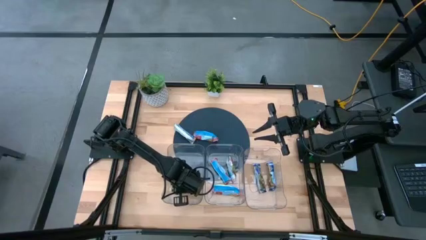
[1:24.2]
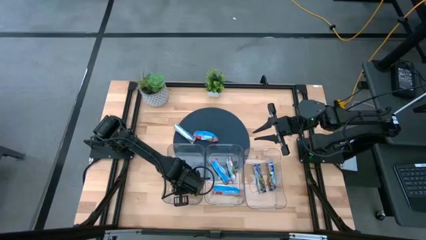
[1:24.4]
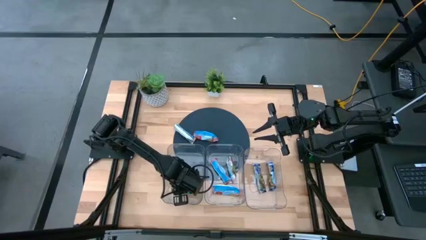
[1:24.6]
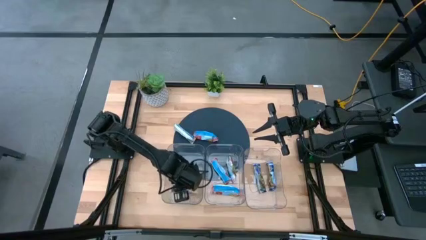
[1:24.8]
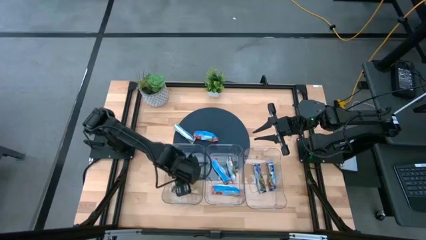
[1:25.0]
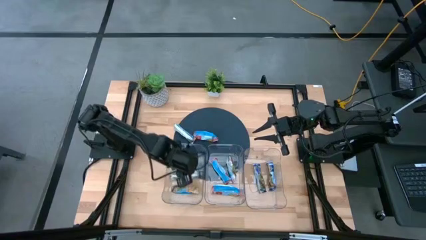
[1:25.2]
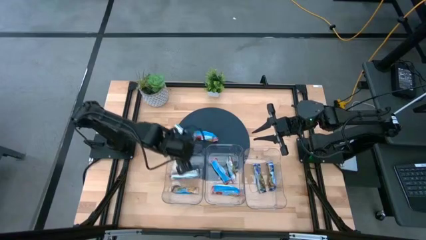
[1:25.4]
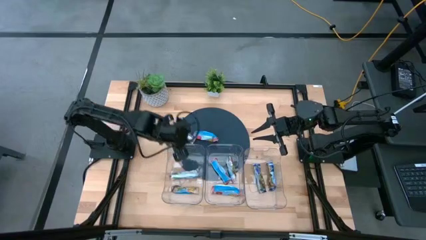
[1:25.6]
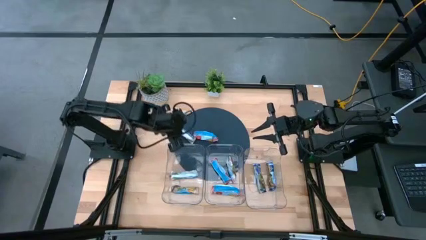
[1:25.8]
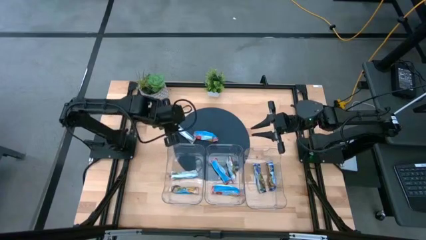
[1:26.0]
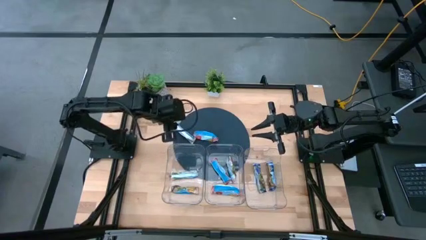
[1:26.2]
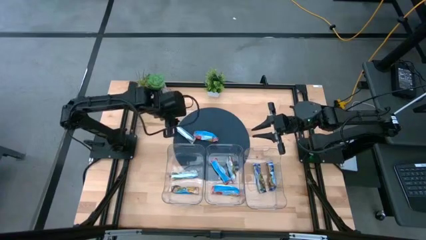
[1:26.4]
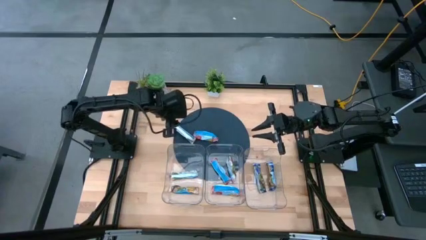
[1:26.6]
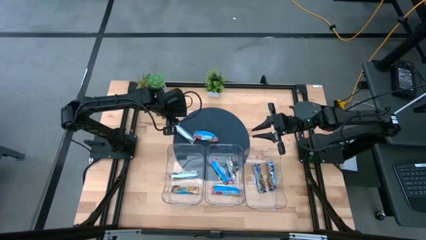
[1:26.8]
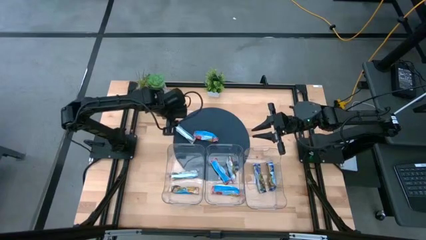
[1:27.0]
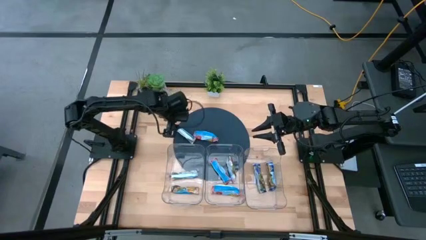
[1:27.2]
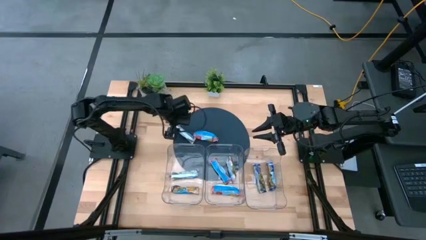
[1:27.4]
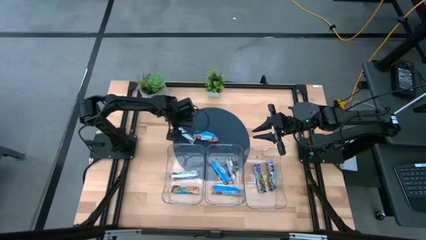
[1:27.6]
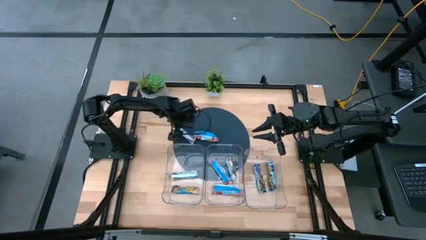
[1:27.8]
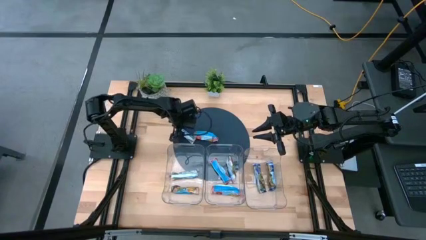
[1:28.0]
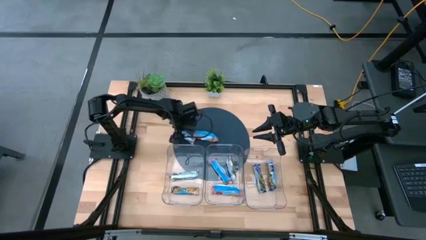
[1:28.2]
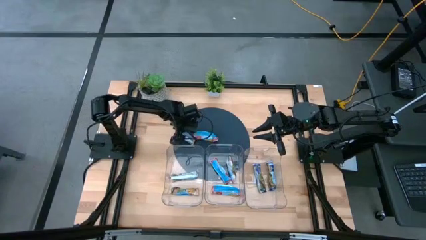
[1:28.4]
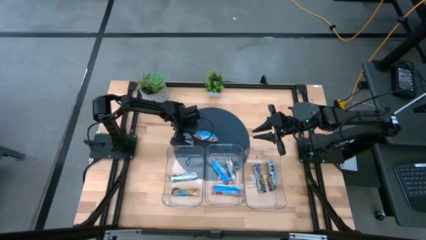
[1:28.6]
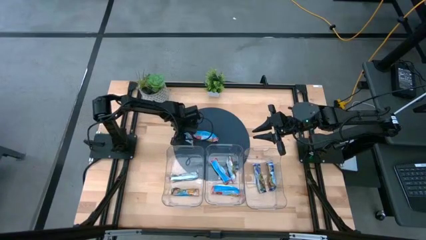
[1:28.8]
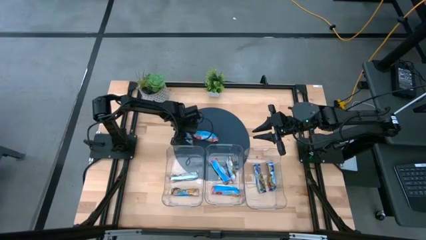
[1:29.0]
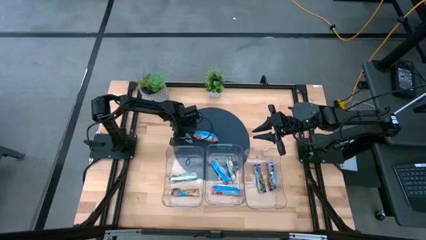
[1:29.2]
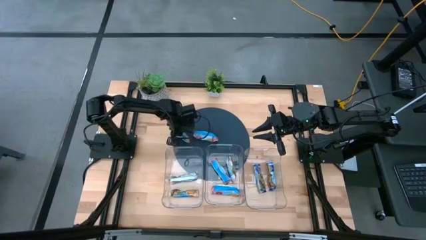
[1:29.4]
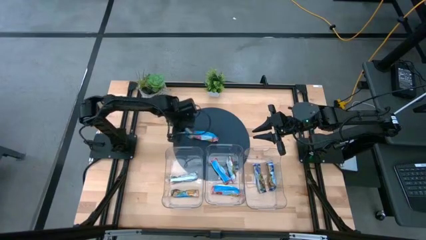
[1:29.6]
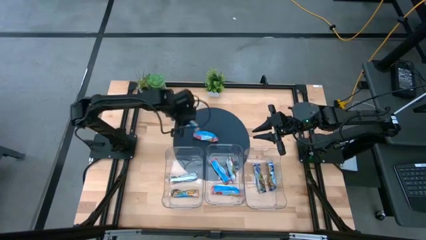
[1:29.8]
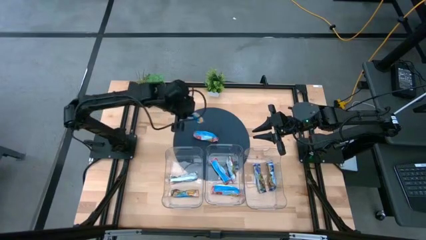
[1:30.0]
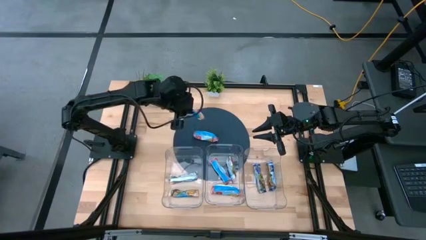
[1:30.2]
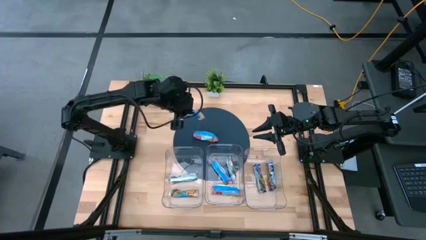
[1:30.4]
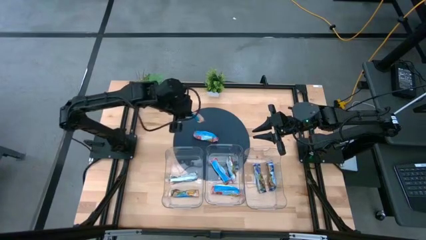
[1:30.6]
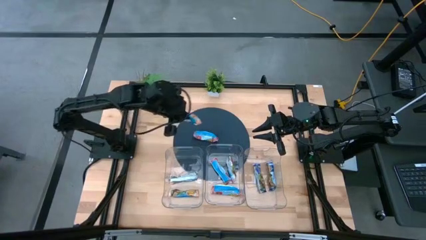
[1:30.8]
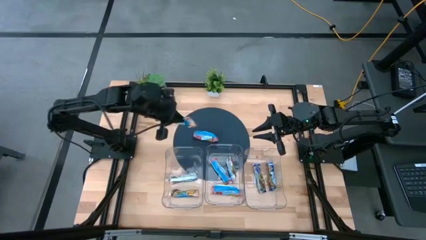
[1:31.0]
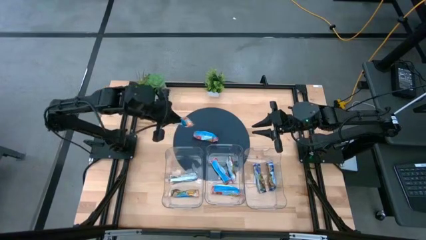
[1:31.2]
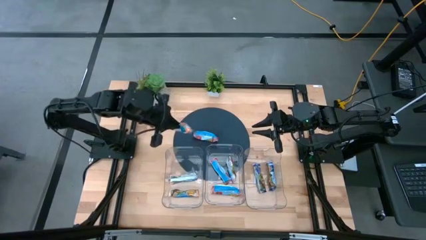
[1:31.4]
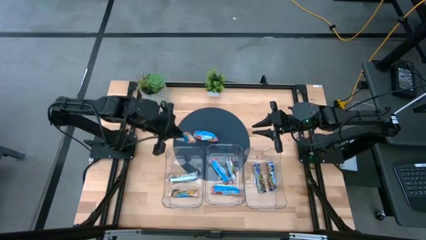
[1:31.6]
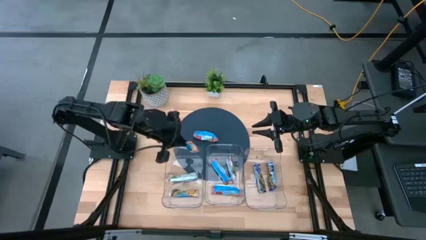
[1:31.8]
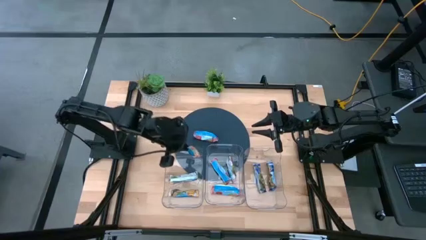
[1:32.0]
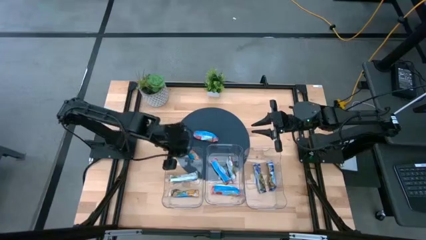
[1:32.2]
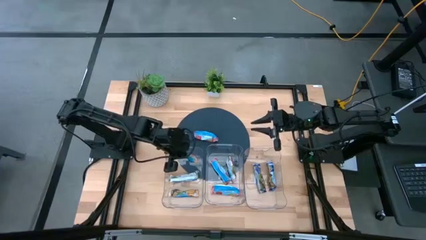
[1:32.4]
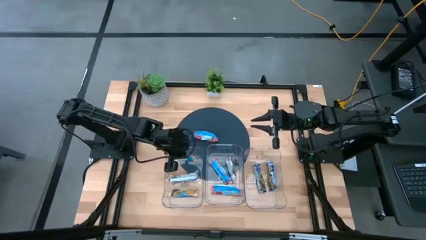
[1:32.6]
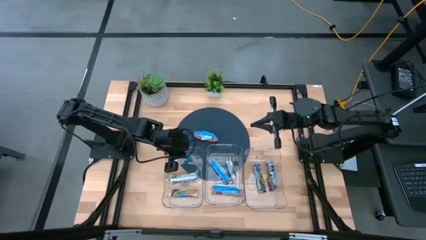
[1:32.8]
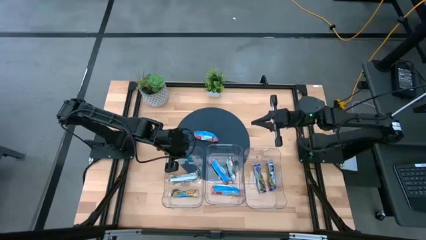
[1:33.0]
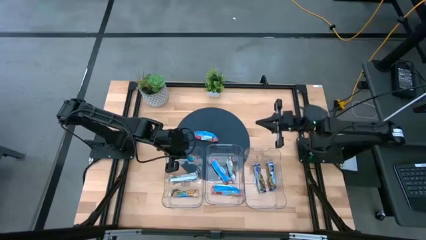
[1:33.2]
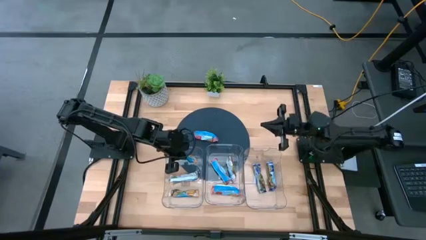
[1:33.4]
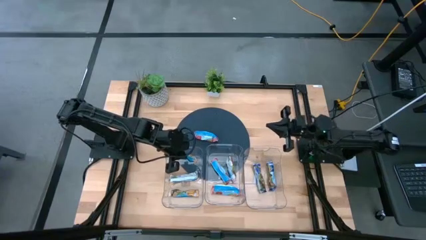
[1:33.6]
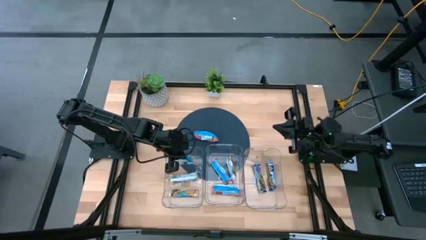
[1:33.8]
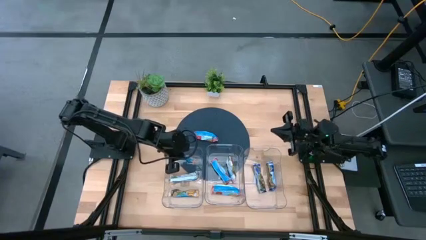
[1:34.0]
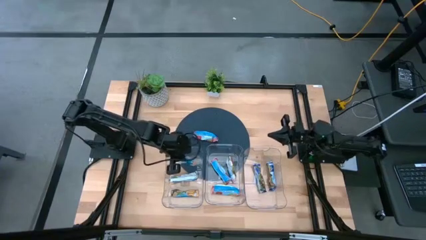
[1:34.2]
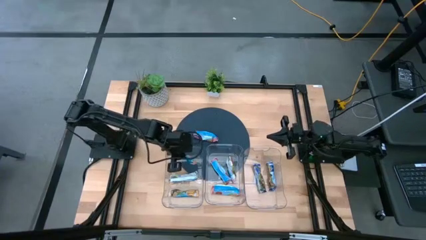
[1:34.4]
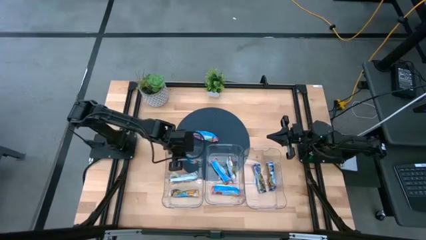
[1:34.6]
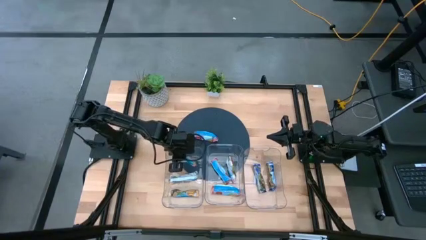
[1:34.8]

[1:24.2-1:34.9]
Task: Pick and place Granola Bars by type
Put the orange granola bar into the left transparent bin

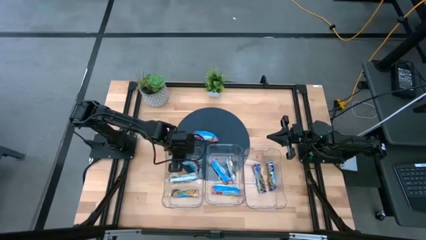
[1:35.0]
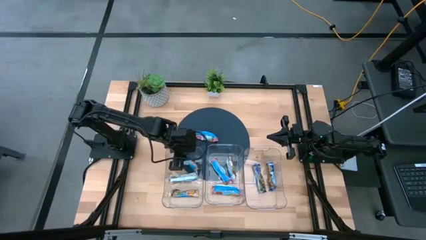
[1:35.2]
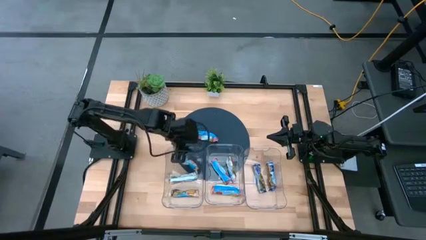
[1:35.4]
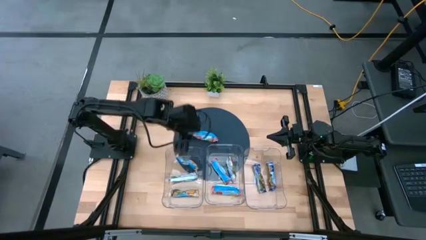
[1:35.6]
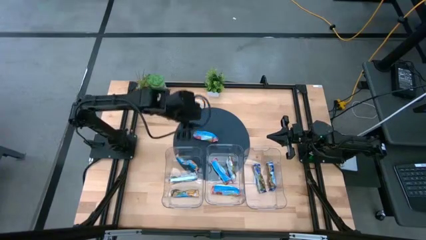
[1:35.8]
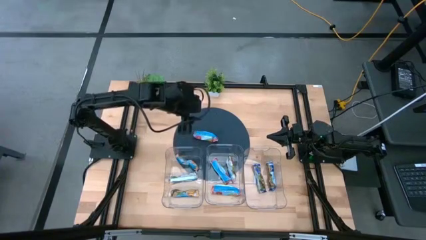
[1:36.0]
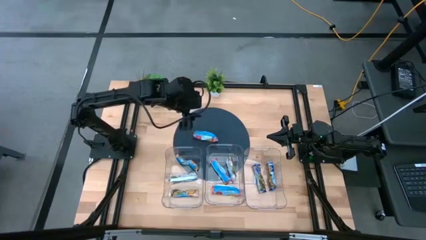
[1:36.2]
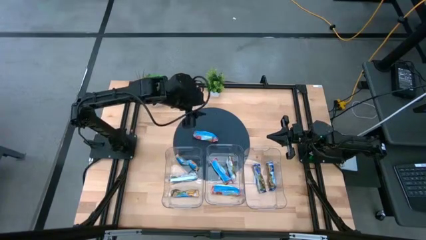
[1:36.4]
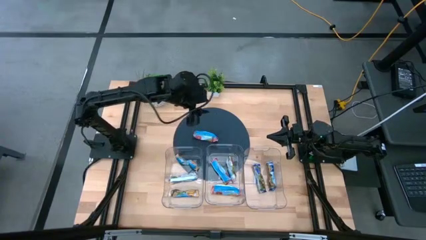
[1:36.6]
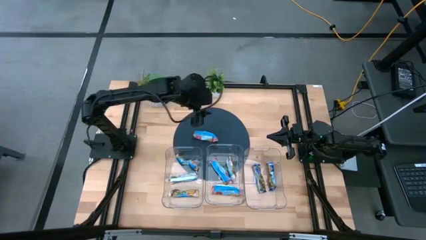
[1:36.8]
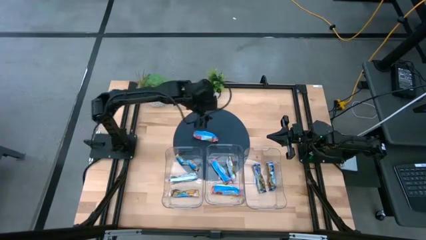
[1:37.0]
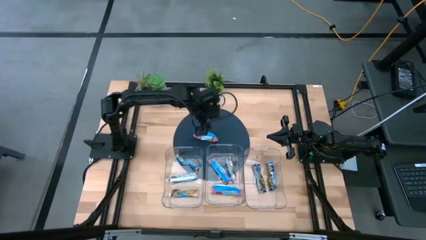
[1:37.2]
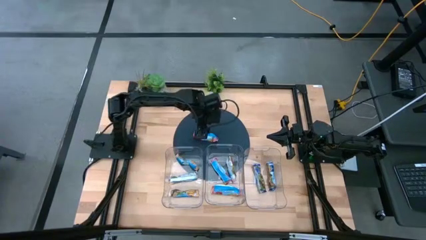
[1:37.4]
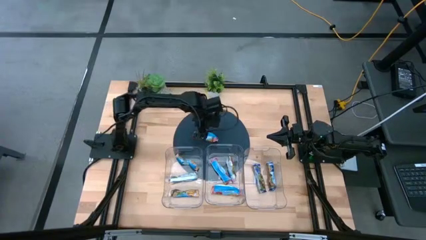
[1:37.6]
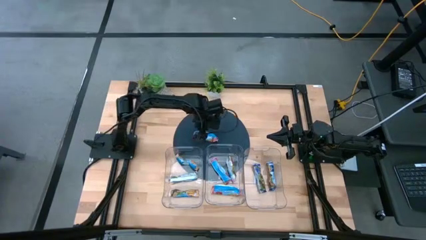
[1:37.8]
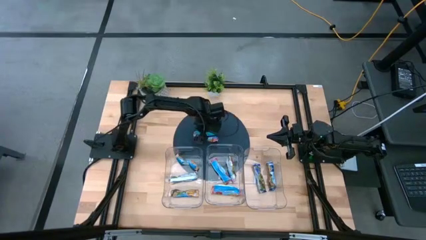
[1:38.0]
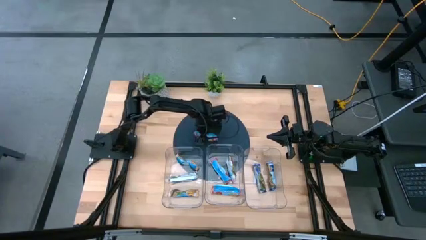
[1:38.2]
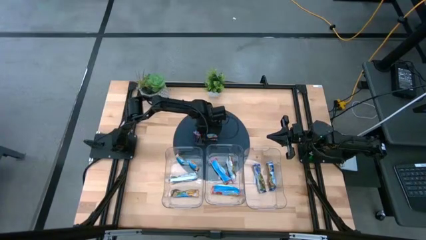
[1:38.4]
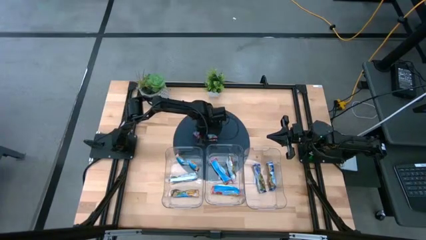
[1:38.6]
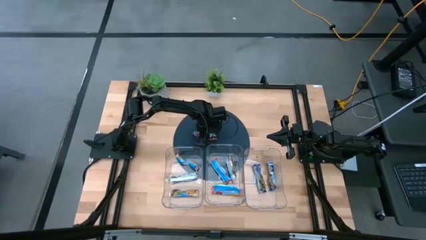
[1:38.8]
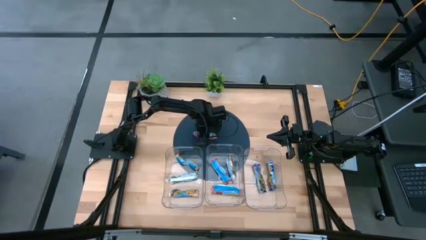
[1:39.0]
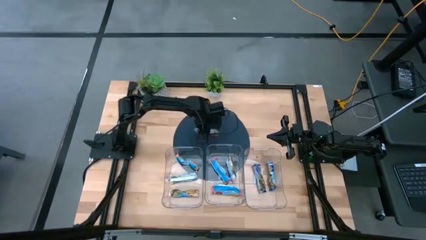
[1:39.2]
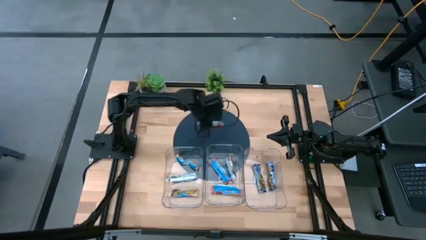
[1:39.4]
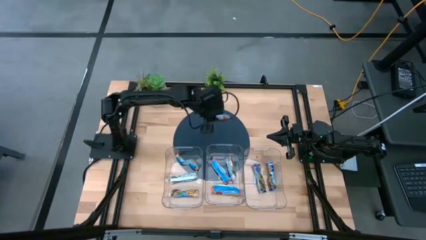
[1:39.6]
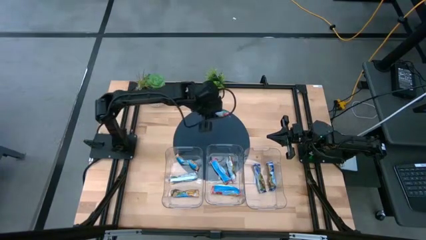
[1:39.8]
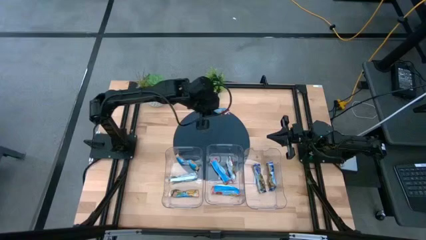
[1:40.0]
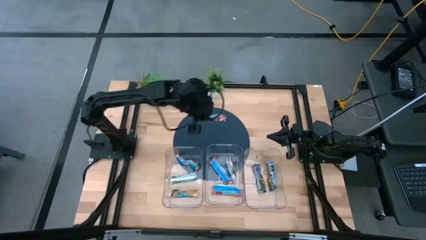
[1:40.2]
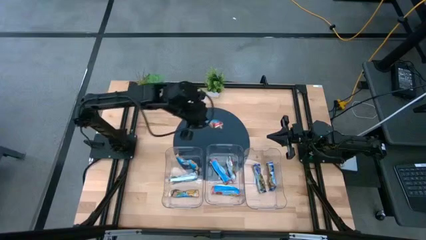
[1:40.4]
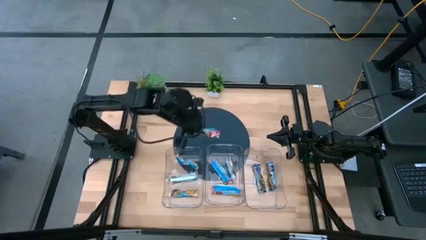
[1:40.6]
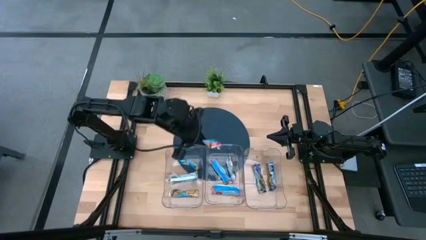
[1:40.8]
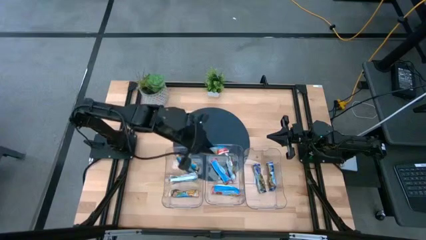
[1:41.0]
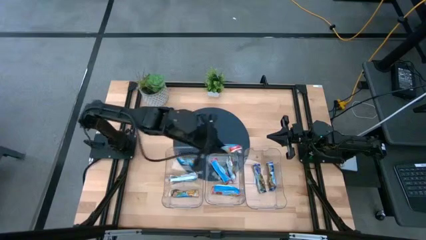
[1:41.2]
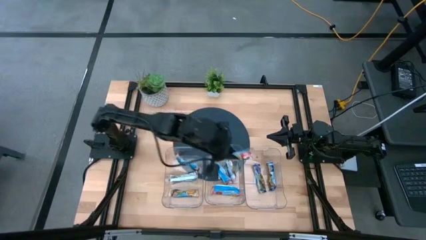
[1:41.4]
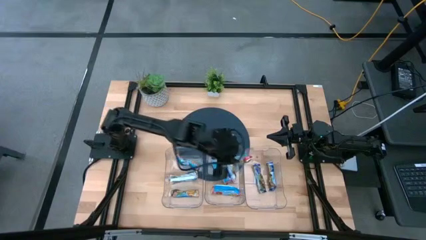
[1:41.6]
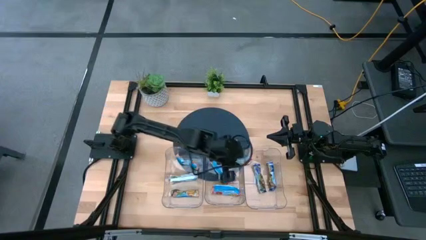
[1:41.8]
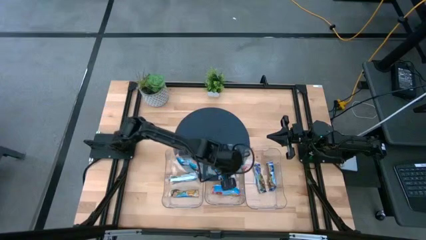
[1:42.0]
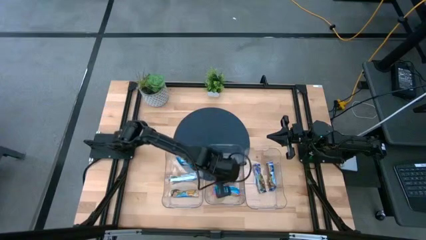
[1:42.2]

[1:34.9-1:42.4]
Put the red granola bar into the middle transparent bin
